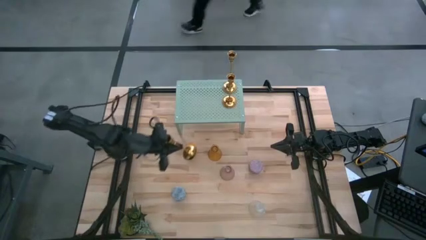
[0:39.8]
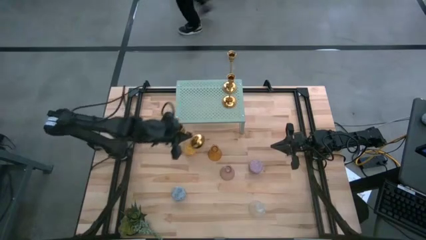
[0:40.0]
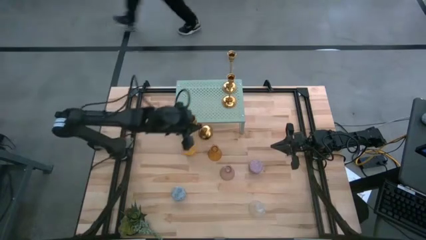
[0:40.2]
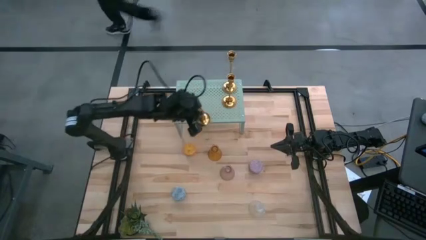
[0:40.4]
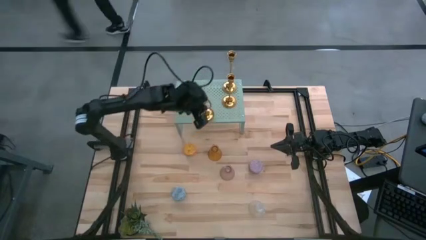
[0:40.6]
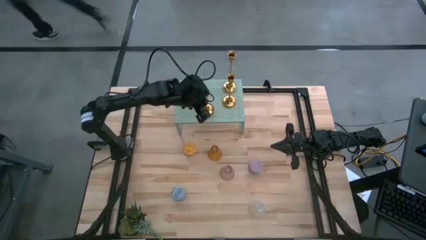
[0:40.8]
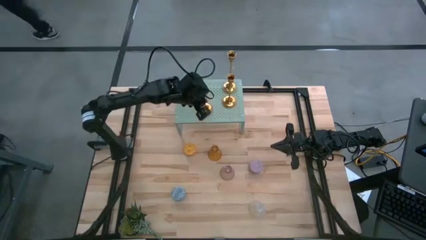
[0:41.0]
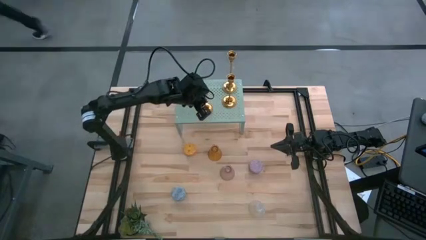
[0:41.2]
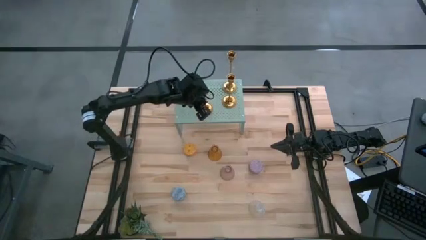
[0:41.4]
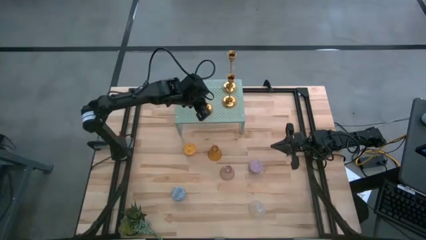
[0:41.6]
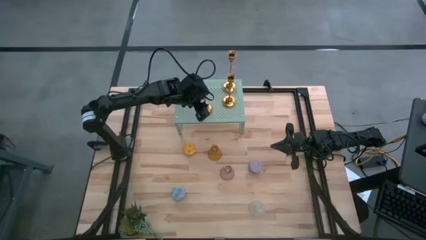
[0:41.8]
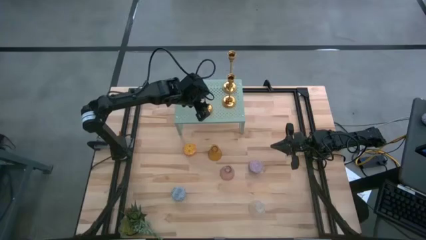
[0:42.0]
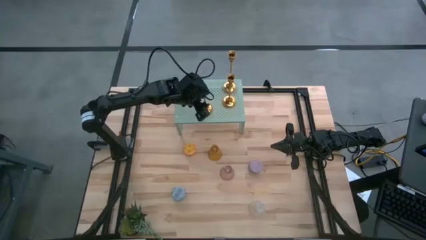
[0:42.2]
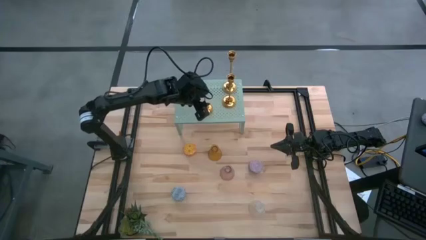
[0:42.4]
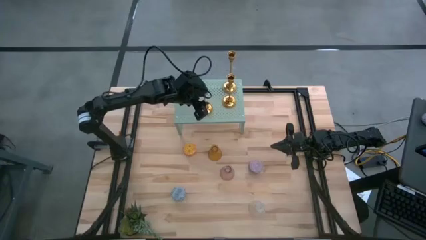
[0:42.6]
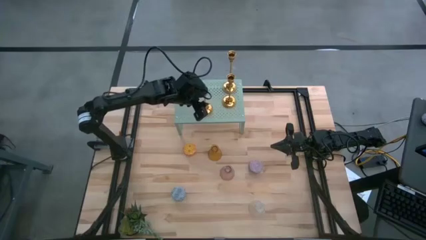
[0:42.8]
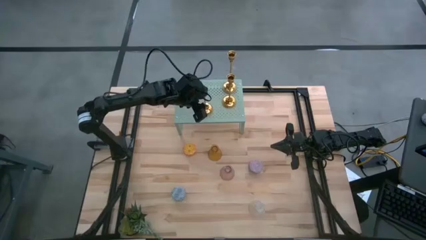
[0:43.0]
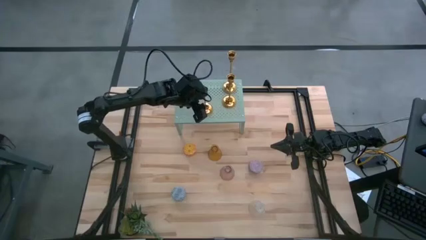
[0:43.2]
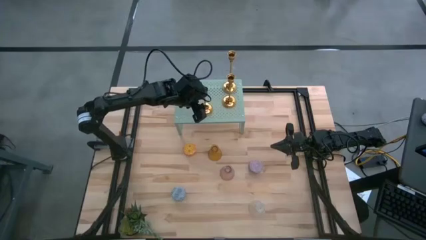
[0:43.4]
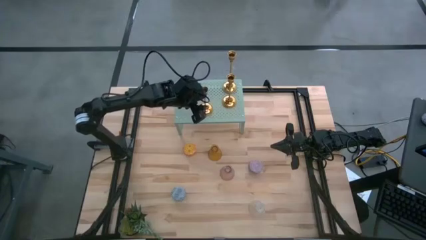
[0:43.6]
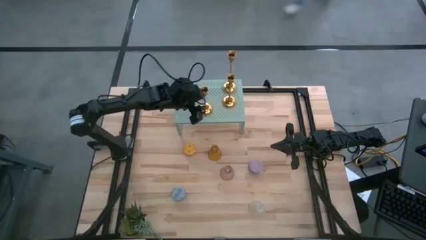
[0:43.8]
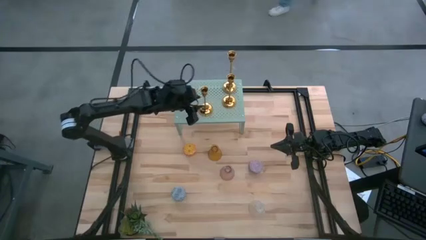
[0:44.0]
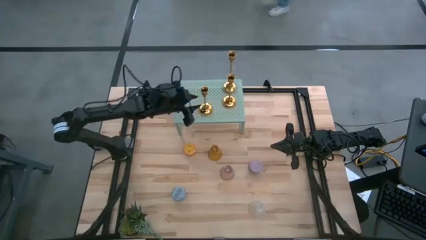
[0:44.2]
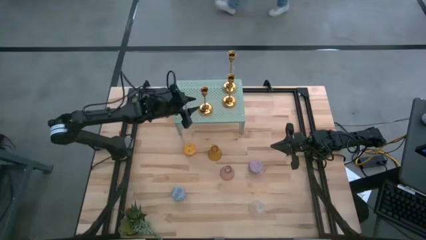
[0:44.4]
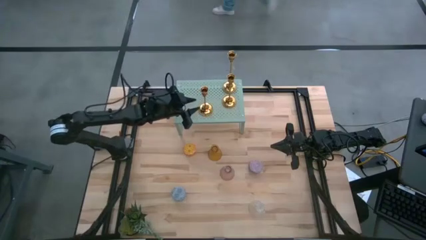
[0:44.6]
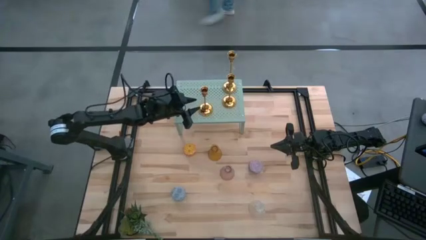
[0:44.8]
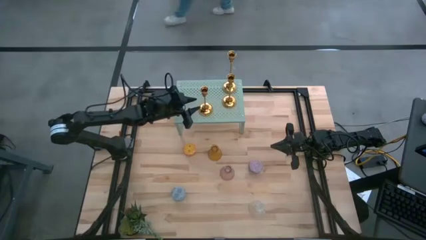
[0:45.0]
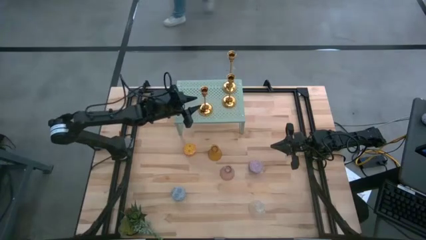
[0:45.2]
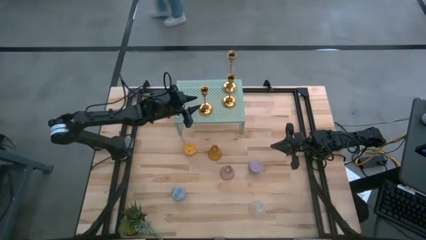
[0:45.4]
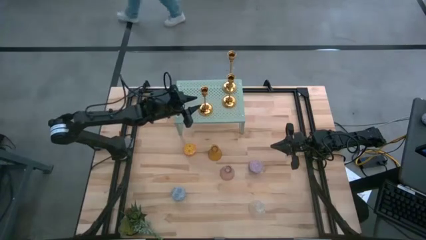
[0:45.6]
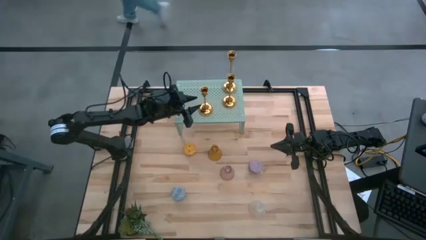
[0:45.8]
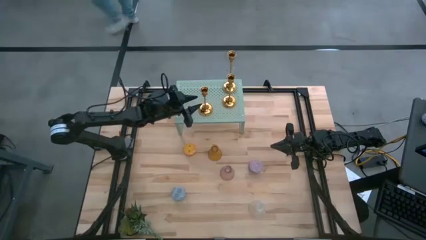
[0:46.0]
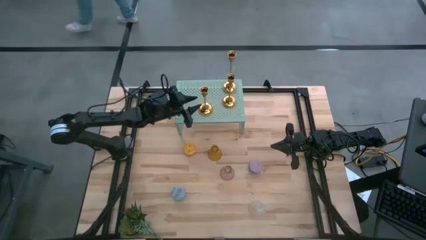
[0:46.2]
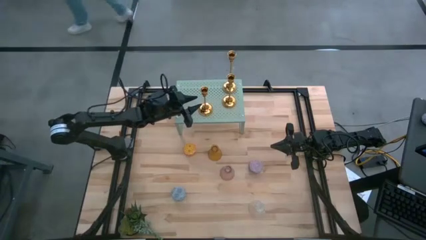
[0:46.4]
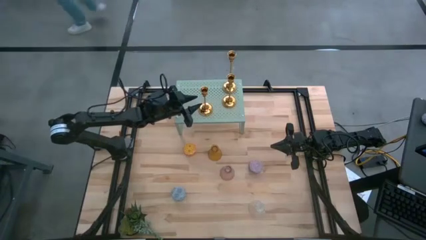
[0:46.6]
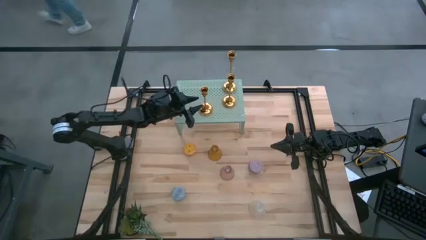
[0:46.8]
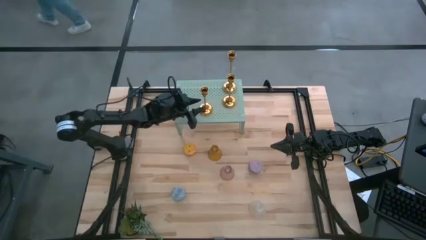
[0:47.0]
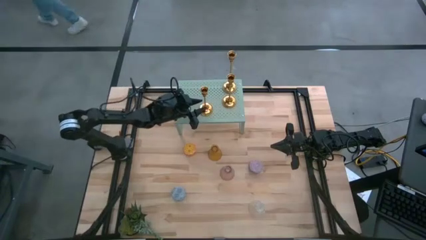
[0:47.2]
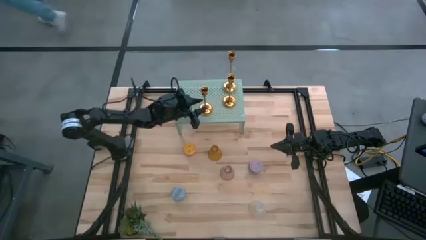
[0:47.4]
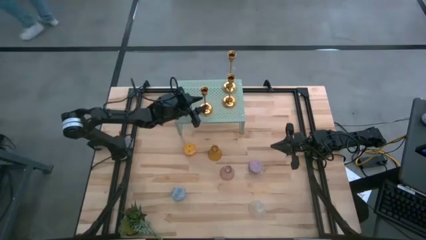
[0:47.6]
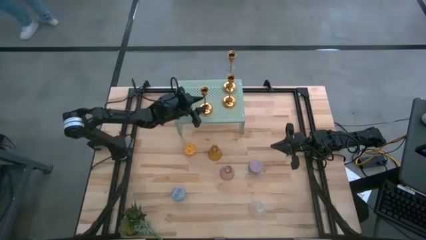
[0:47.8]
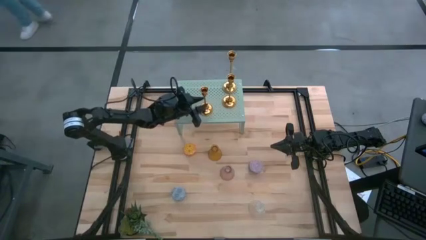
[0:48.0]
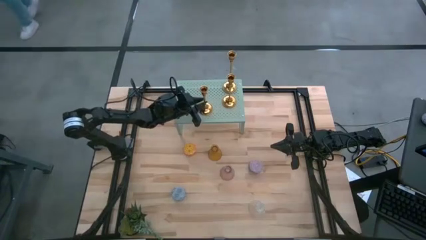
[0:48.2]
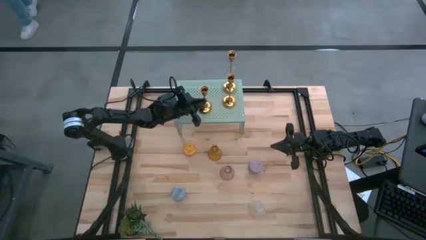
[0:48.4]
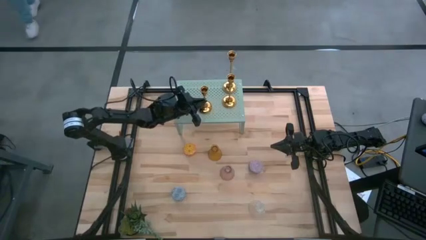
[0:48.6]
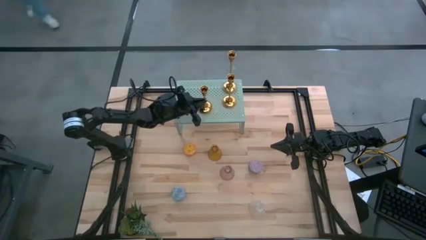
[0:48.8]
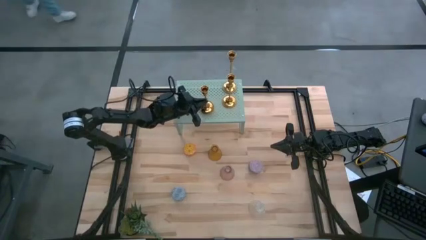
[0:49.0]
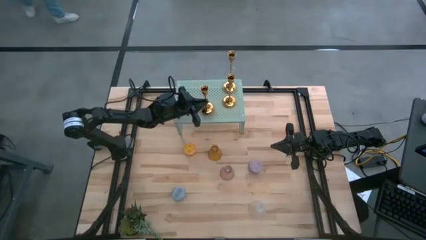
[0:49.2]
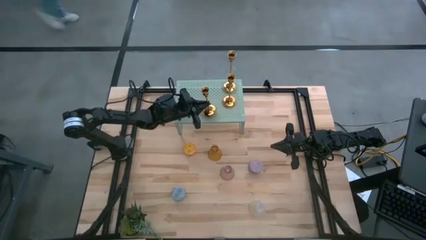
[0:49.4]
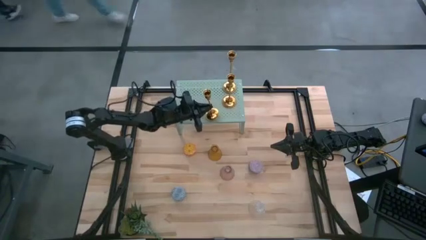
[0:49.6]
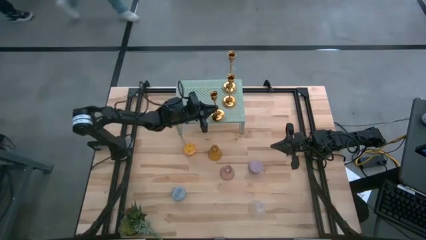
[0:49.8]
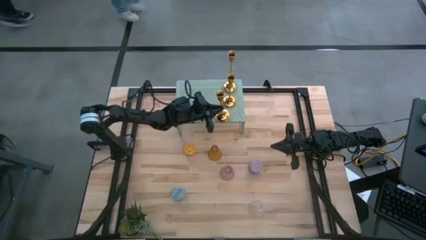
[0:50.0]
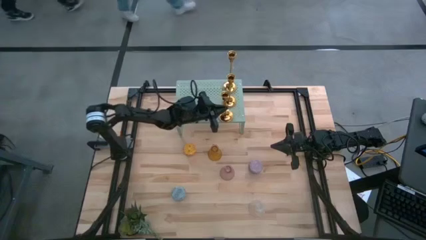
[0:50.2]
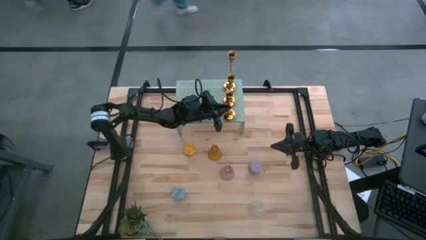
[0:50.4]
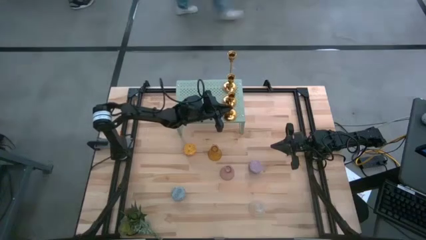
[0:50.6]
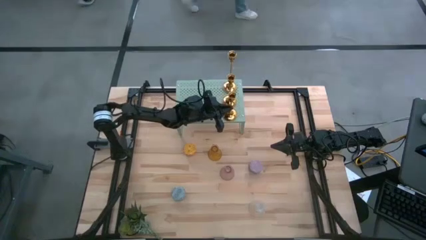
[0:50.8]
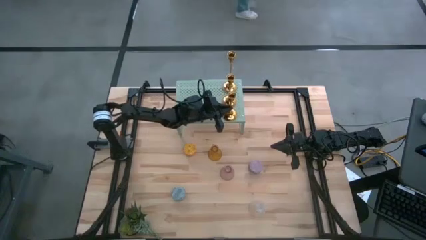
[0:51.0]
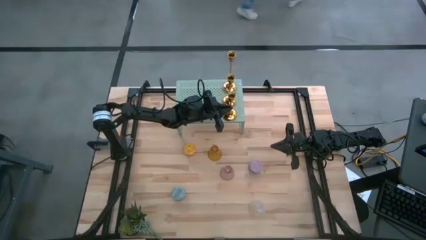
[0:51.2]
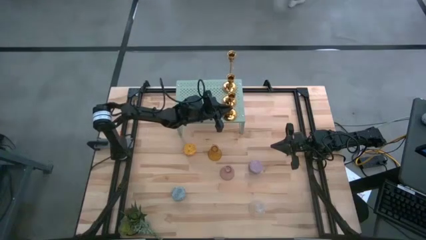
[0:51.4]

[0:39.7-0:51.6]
Task: Pick & Place candle stick holders
Put the gold candle holder on the shelf aligned with the other gold candle holders
